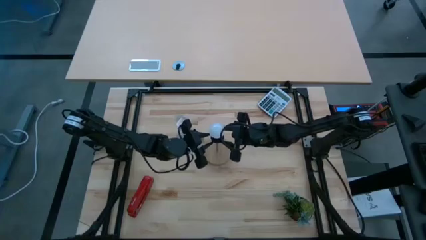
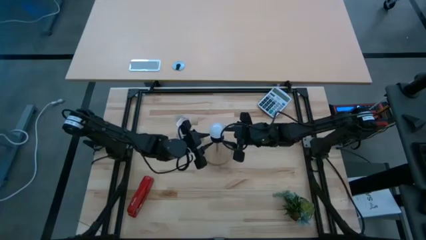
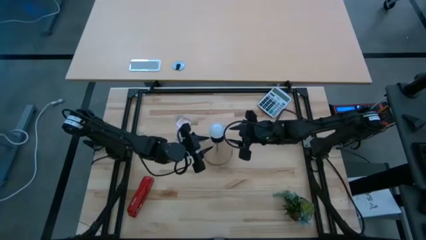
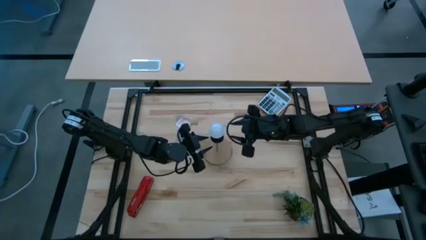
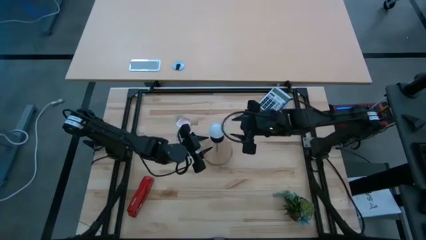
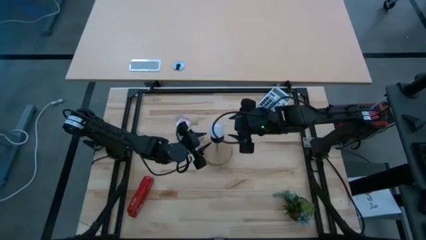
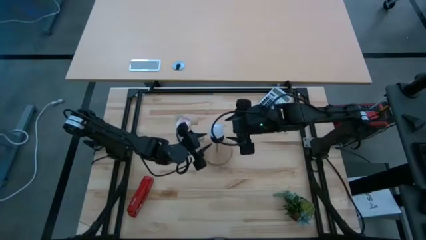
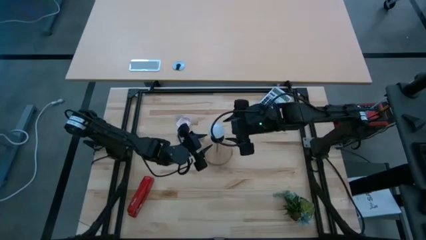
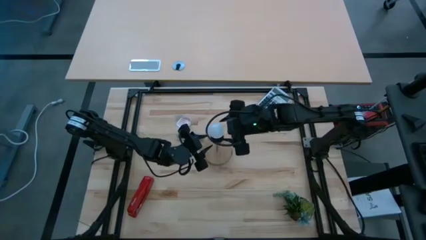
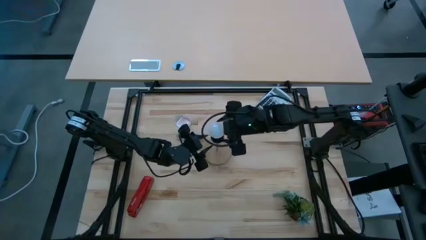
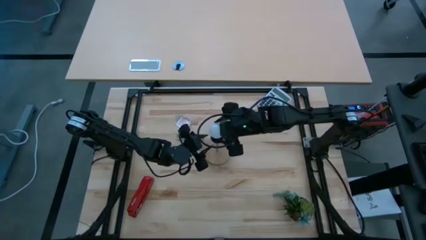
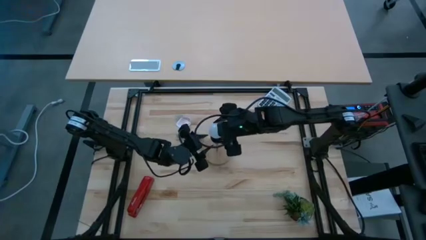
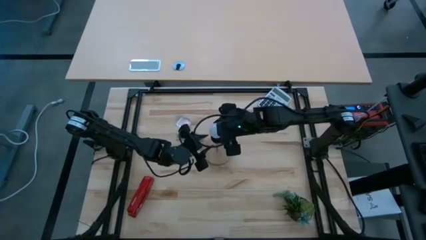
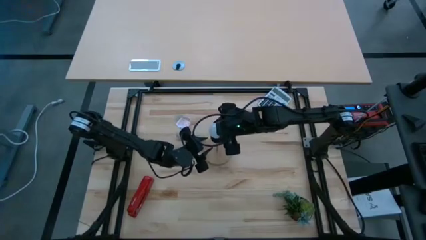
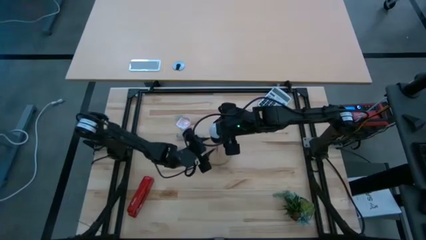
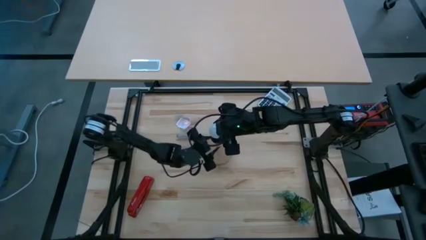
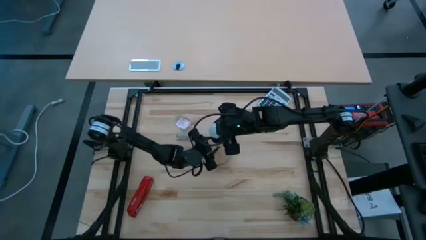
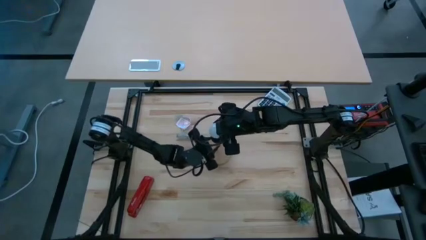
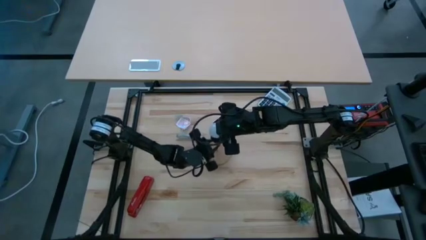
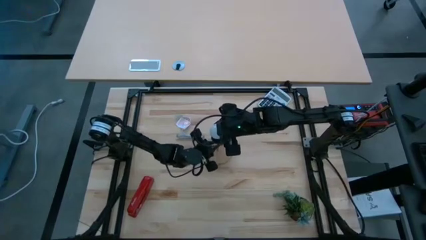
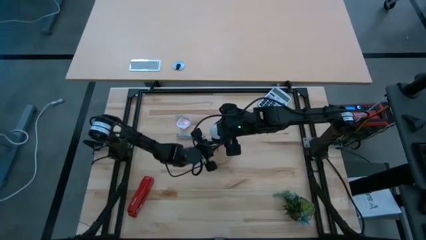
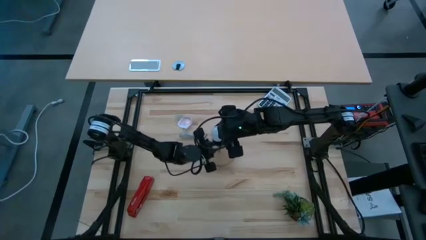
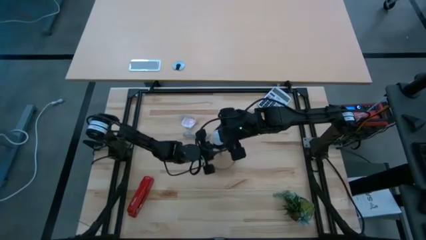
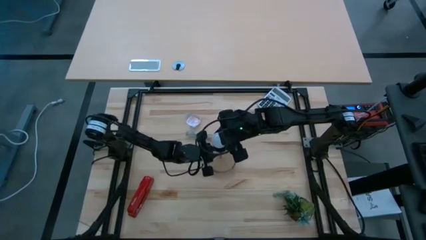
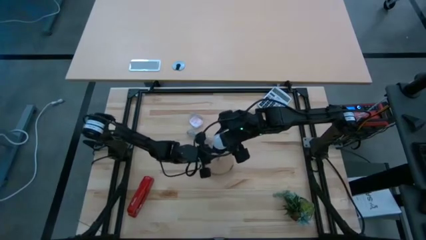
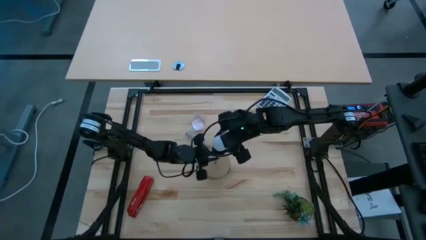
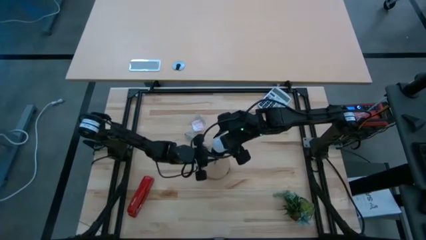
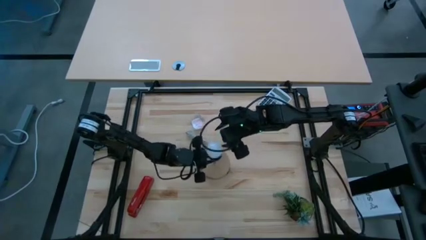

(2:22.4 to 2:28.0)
Task: Screw lightbulb
Remove the lightbulb from the brown lamp

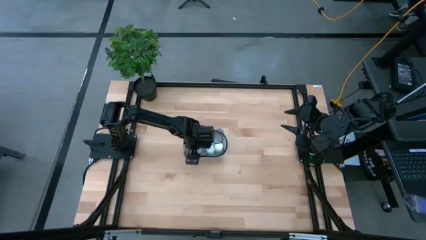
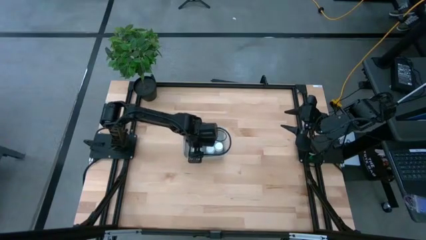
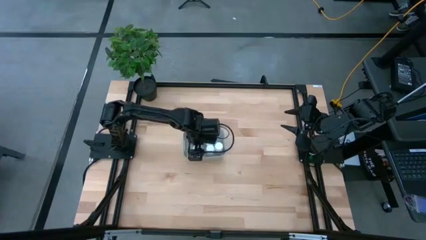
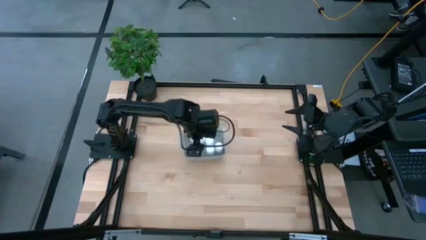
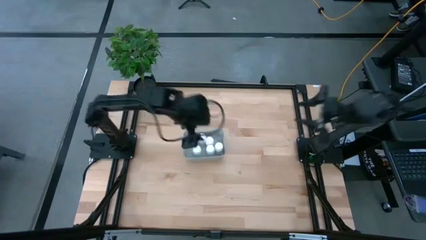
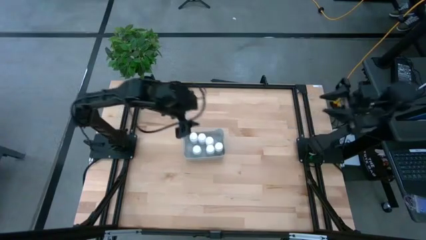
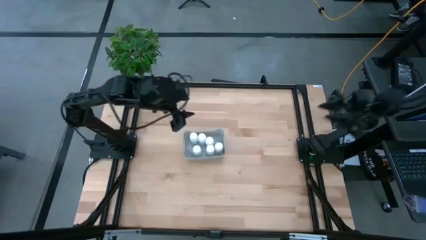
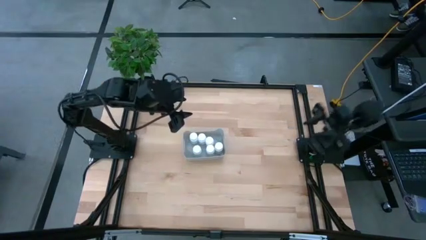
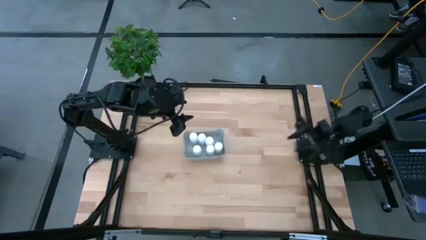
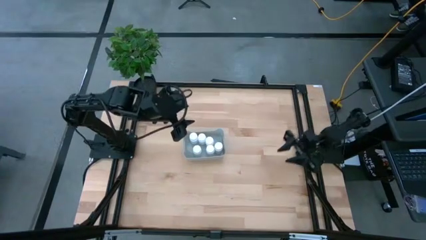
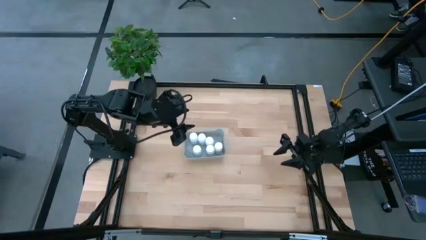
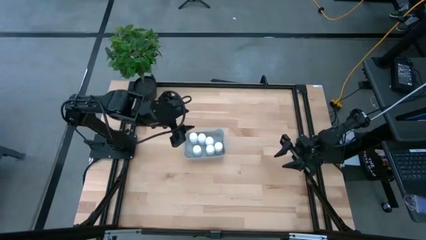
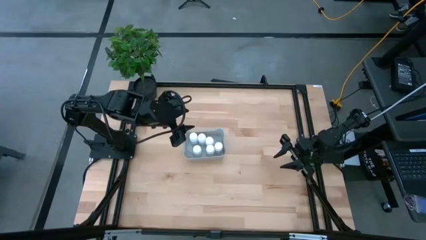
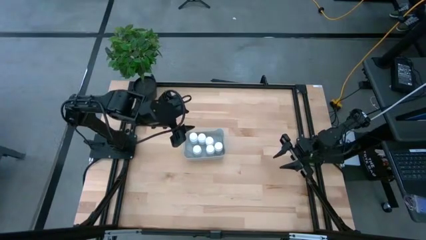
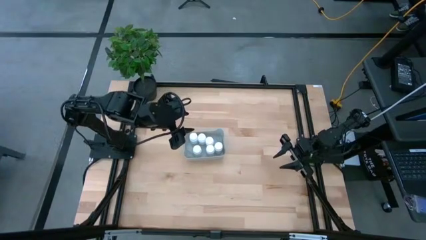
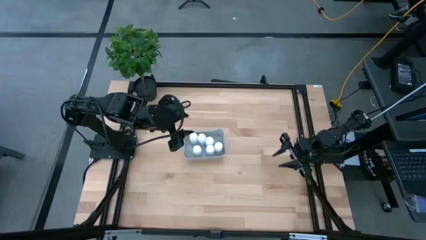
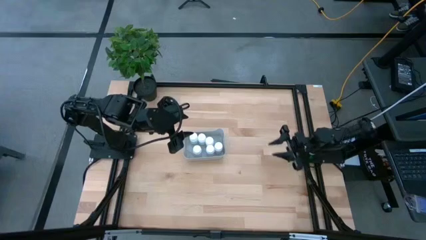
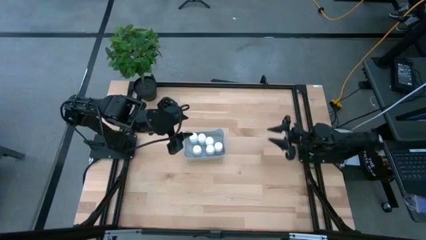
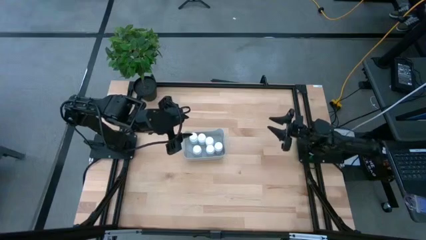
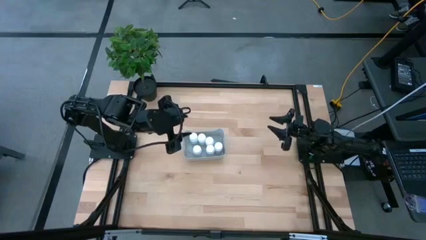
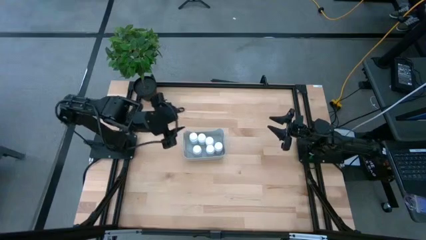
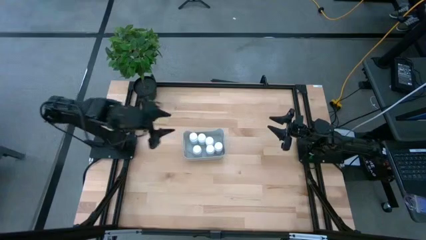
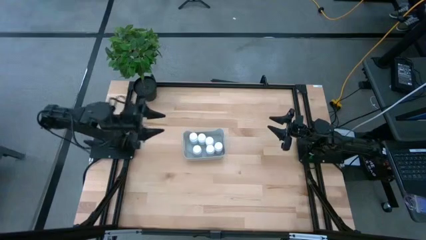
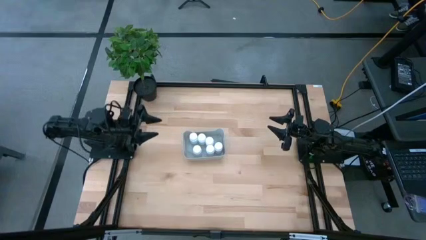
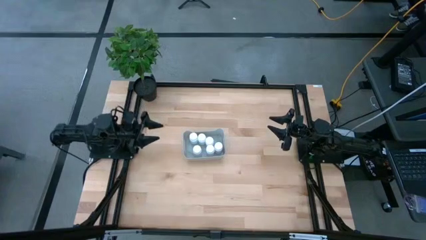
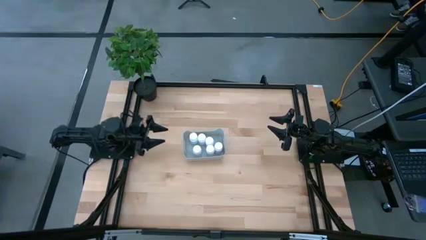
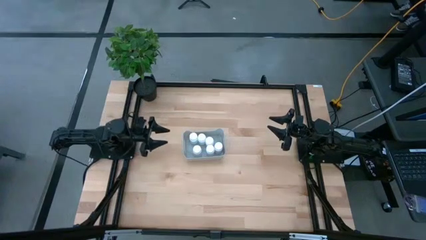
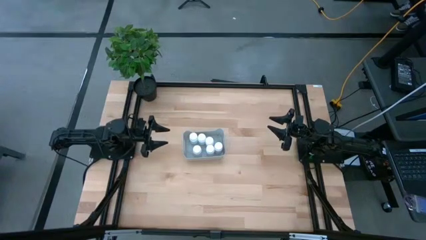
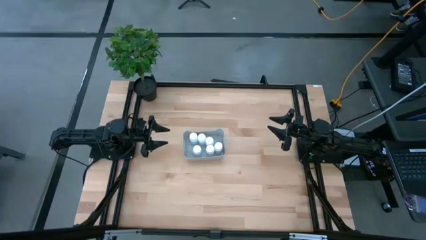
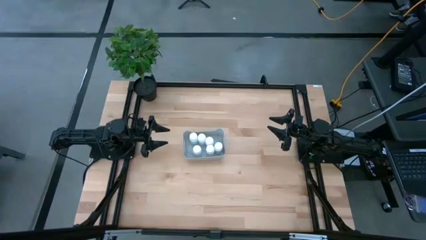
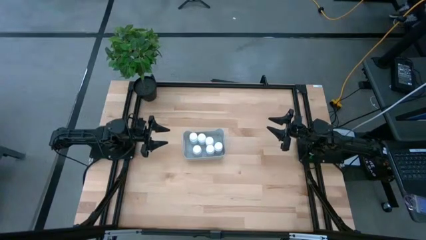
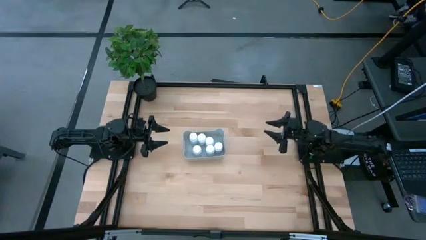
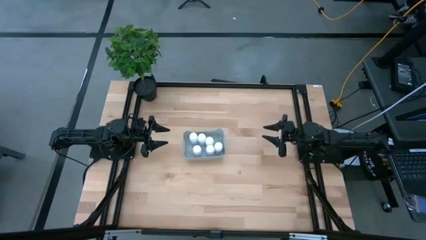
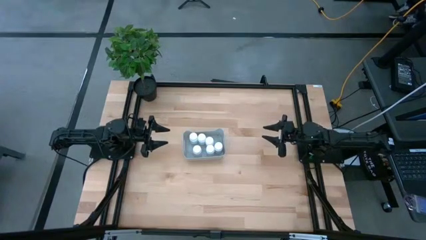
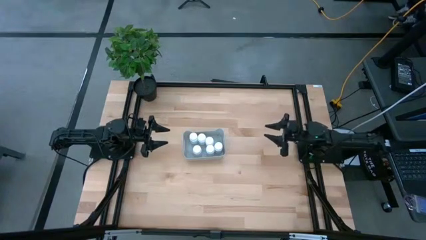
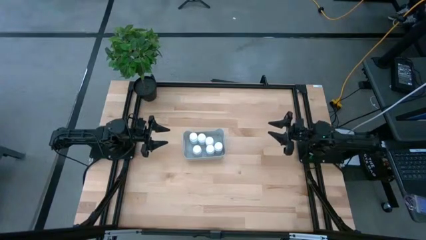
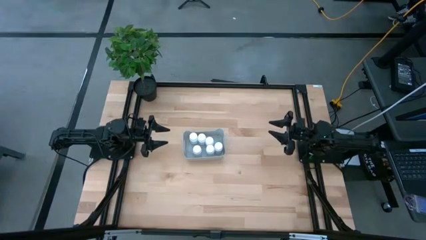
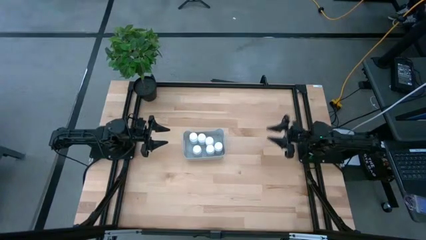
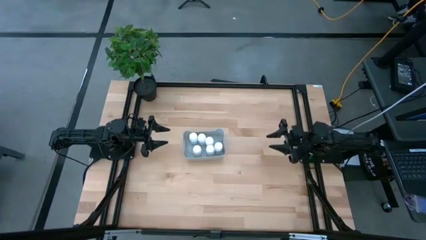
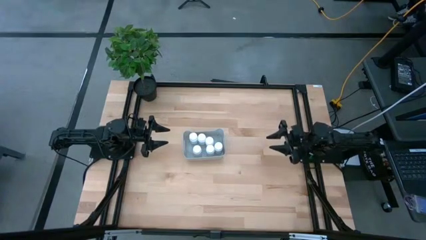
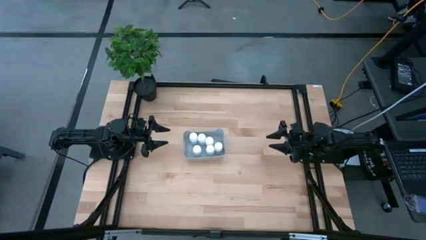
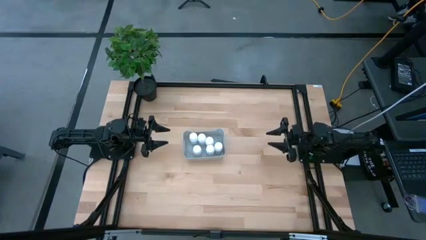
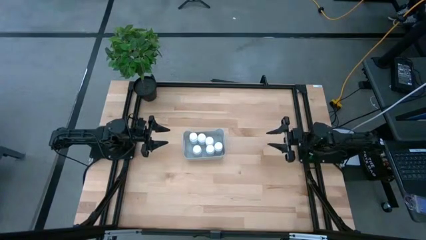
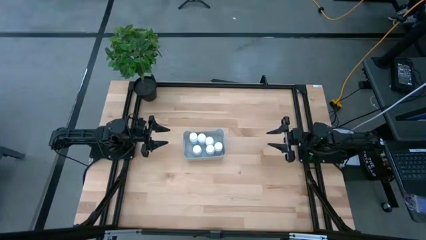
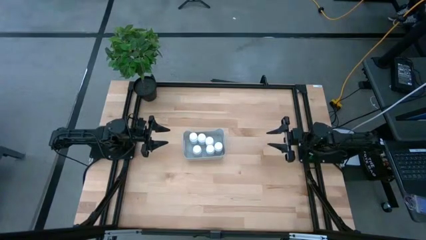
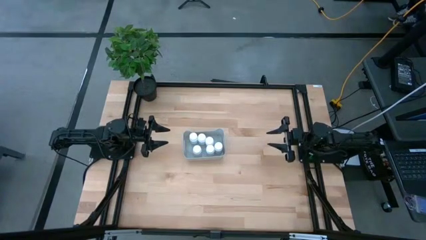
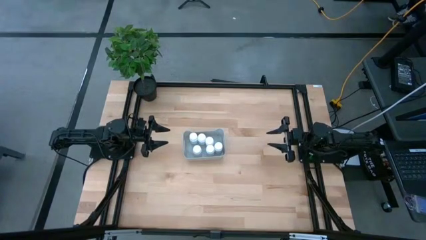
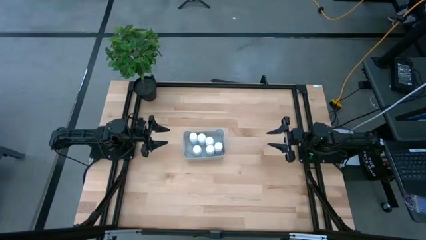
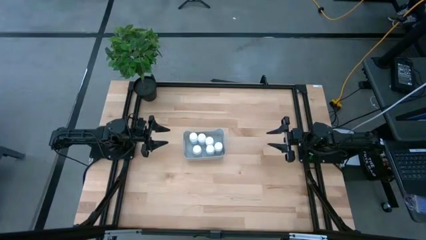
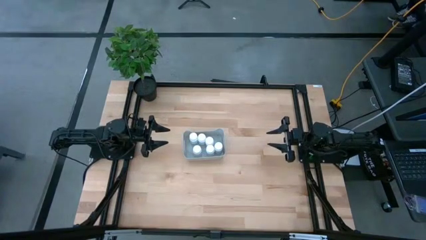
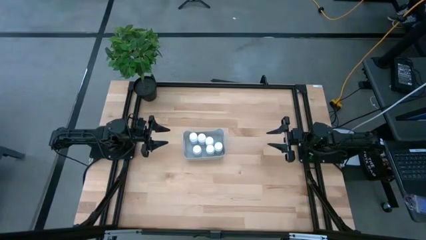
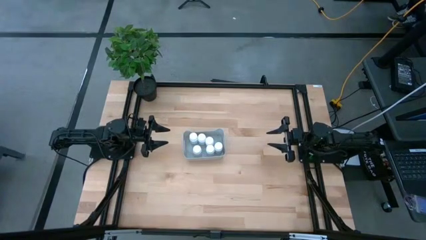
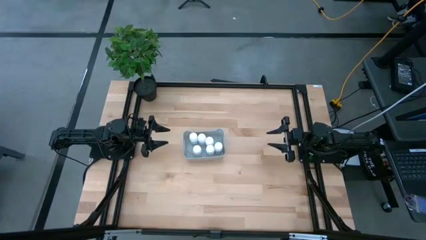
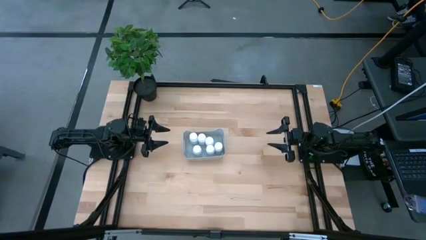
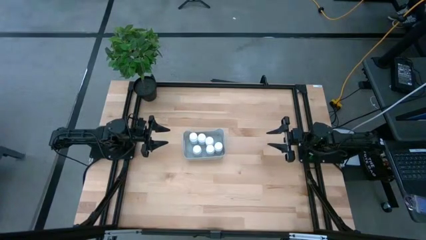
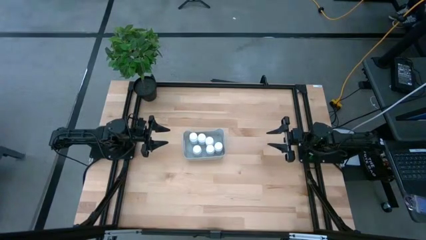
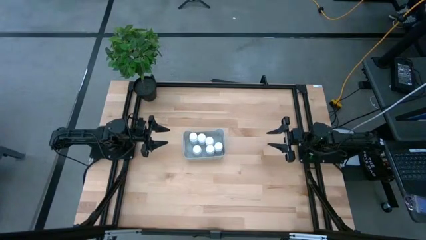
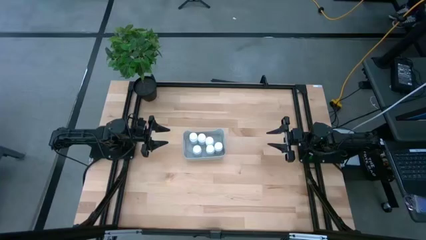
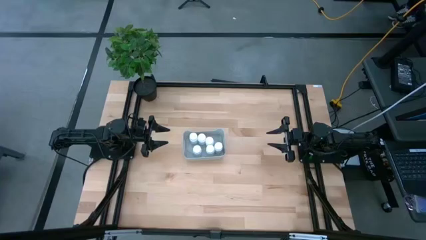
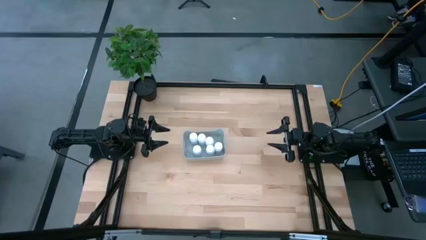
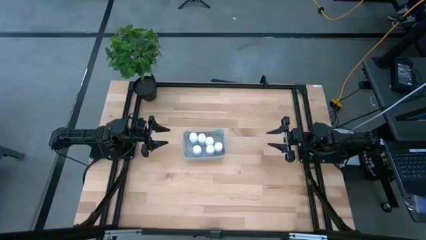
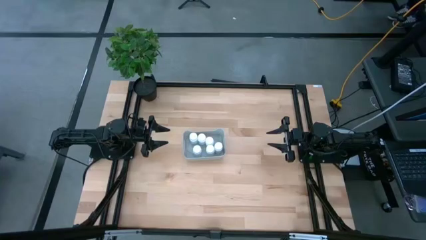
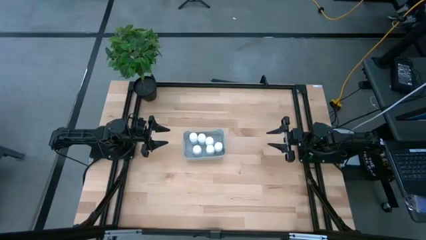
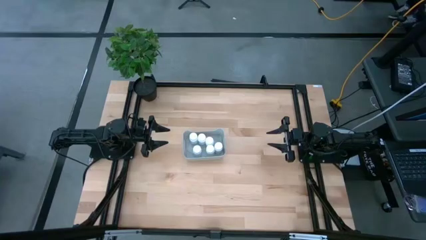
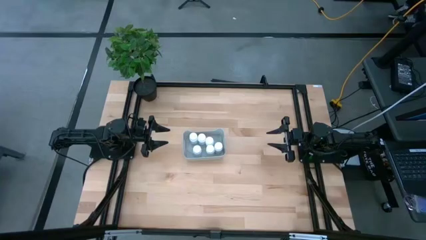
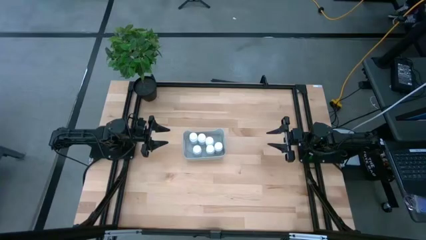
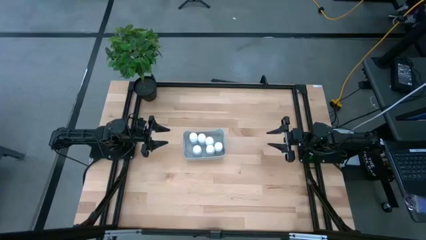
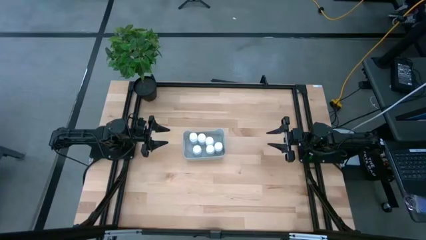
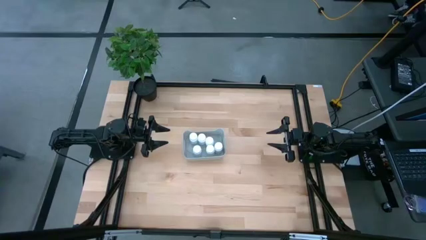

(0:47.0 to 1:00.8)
Task: Pick and place pill bottles into a basket
Return to Home Position
